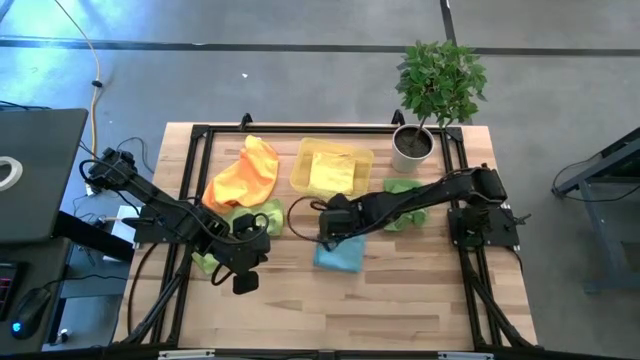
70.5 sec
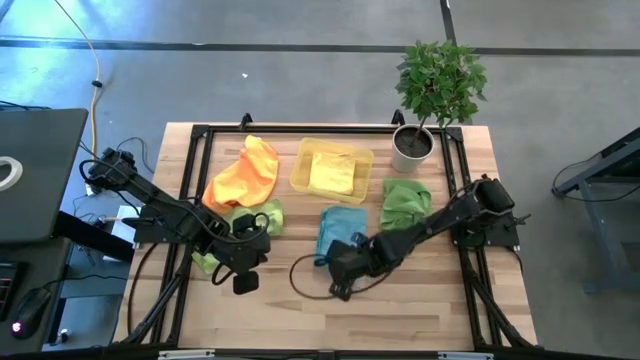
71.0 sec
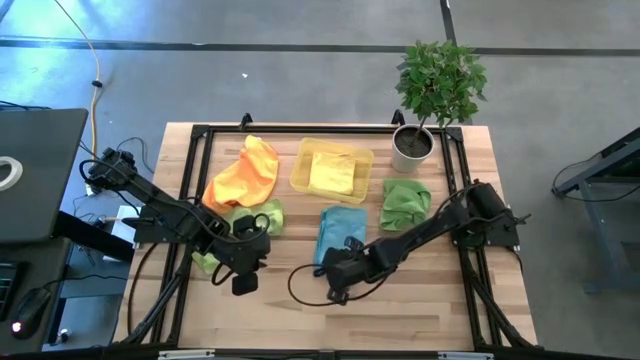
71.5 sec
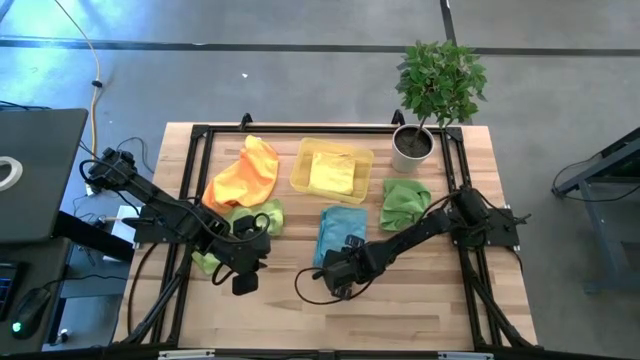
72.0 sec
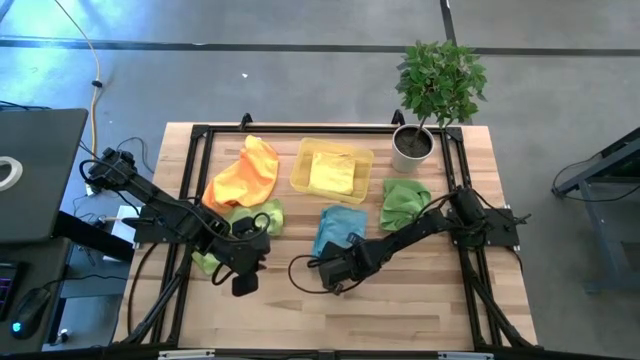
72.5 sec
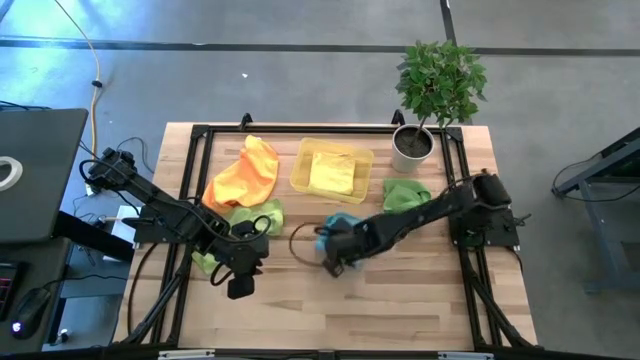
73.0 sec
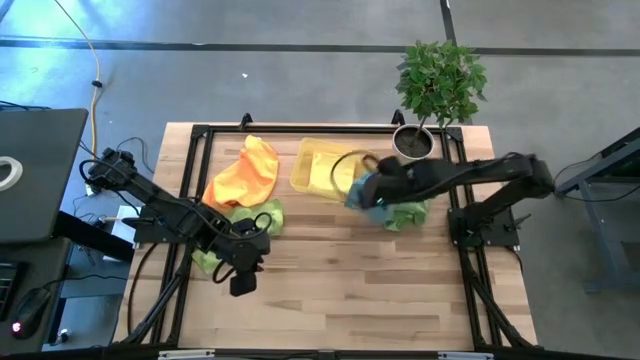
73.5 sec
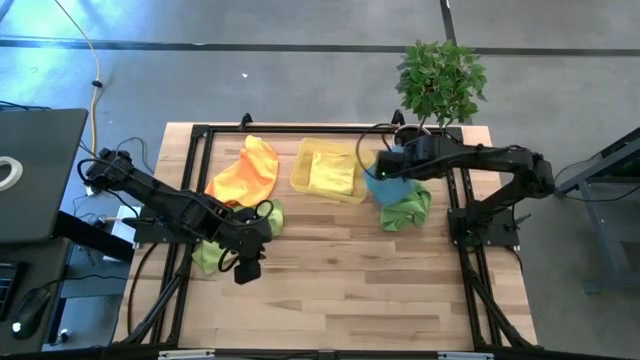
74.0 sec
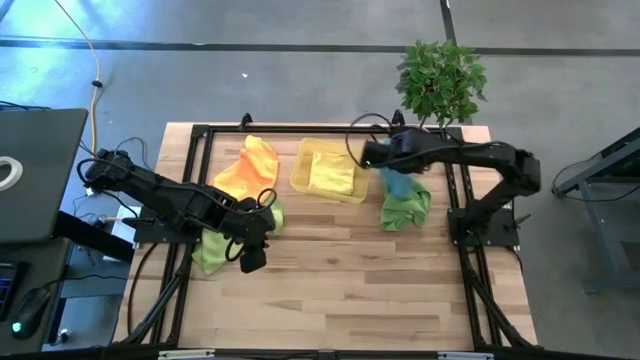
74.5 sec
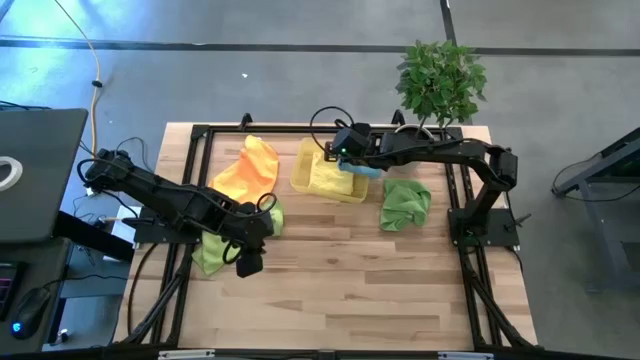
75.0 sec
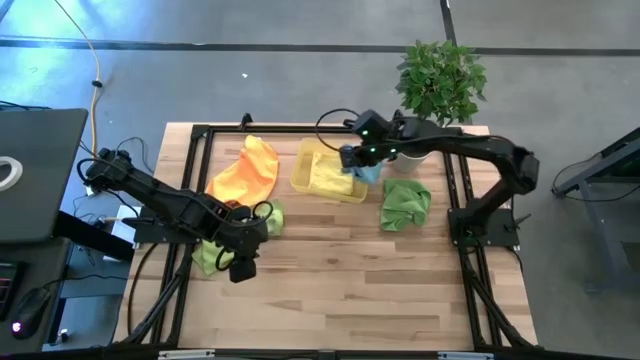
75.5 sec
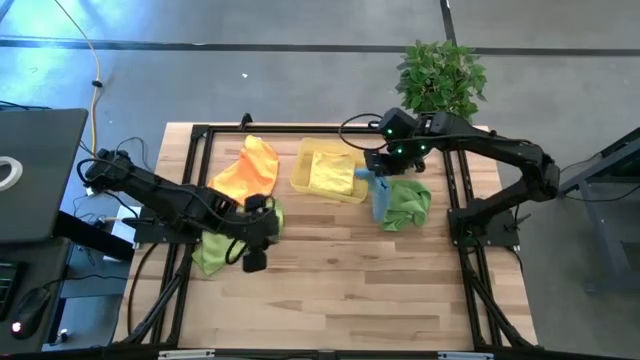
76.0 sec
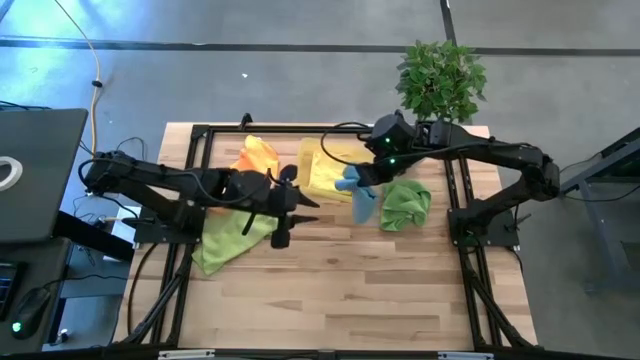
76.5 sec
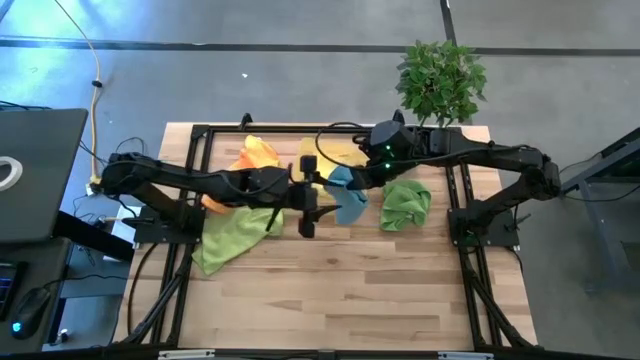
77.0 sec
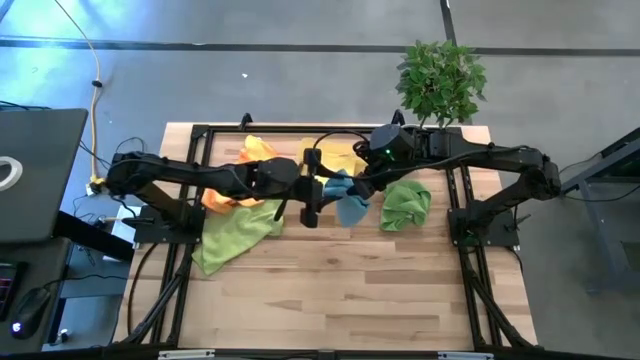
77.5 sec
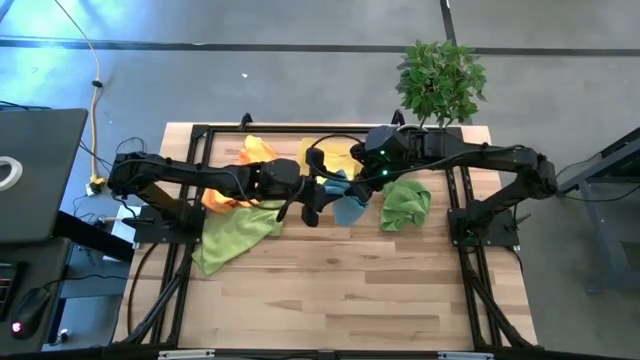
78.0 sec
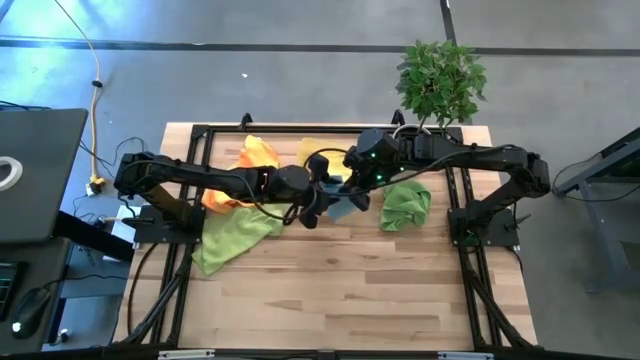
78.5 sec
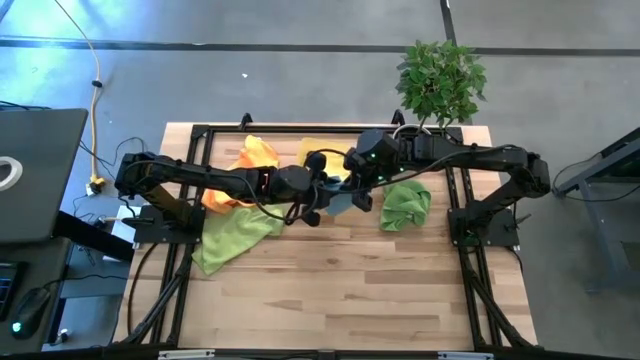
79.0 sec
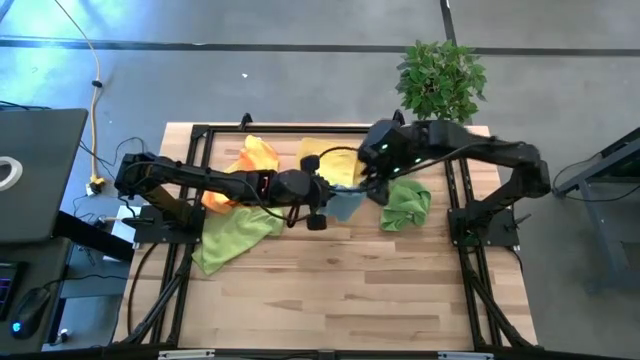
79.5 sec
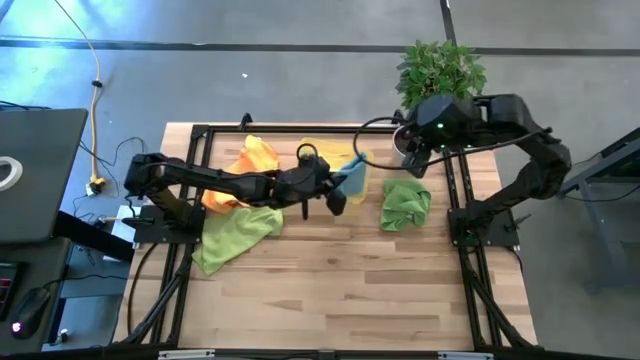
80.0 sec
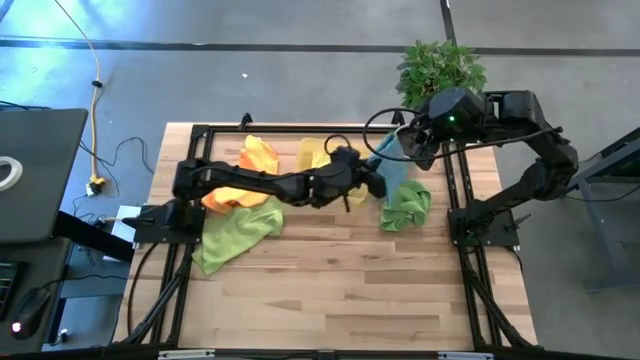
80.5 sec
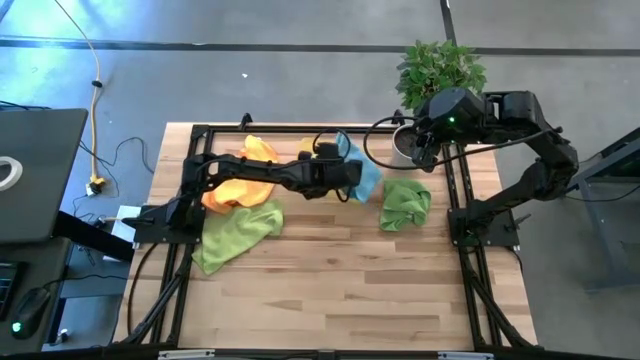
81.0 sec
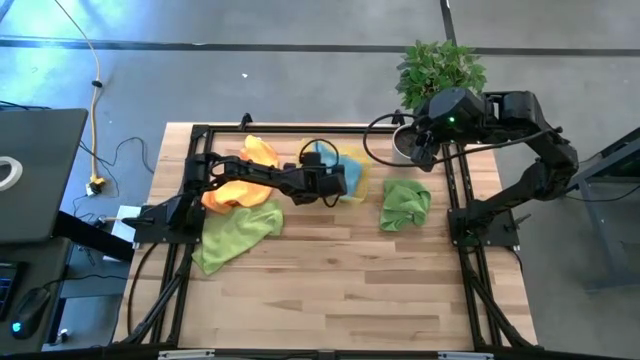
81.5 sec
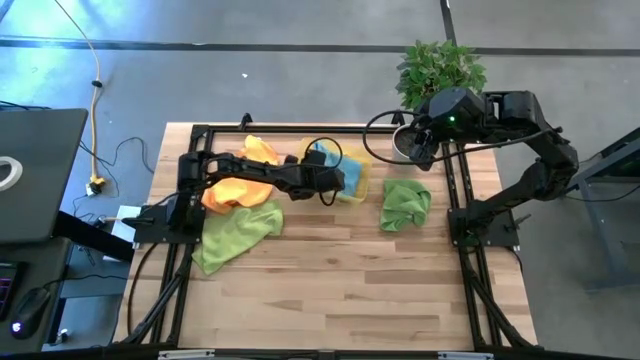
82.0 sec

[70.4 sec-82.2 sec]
Task: Fold microfiber towels
Put the folded blue microfiber towel into the yellow bin

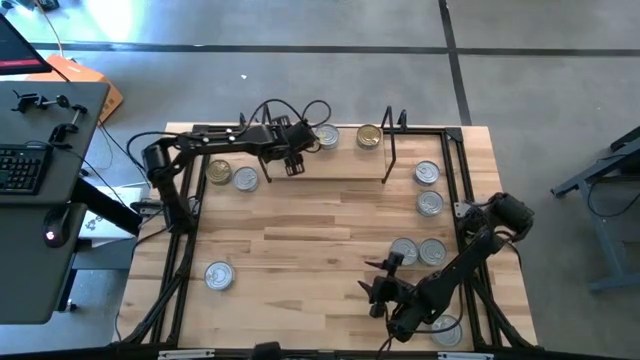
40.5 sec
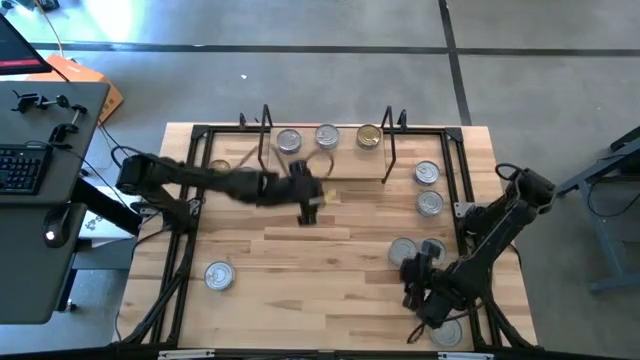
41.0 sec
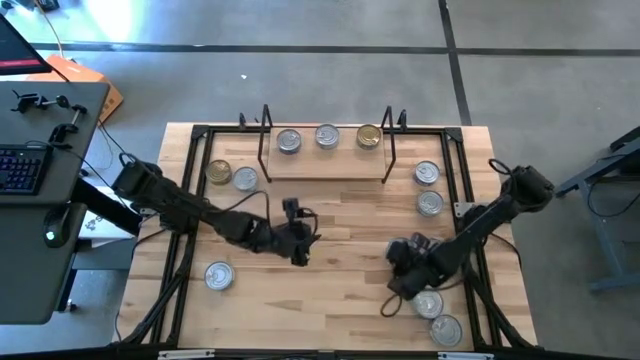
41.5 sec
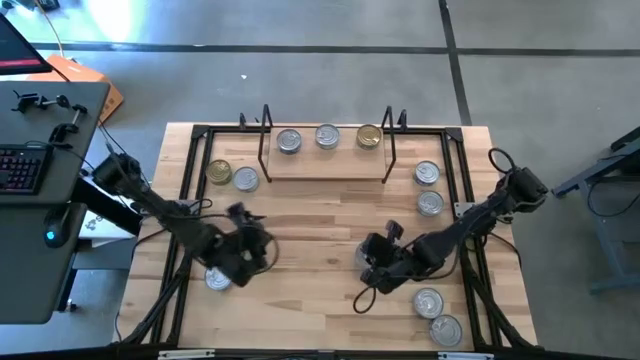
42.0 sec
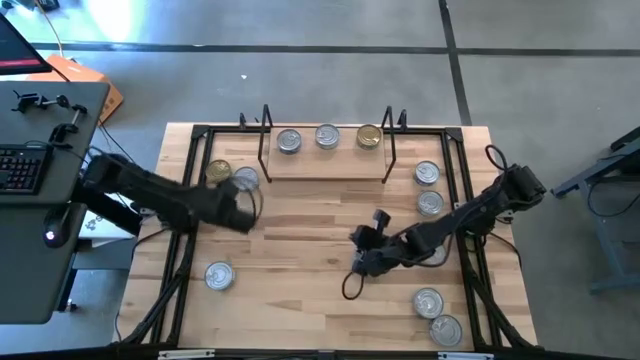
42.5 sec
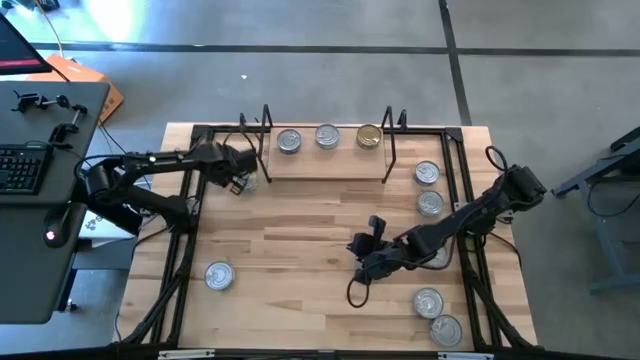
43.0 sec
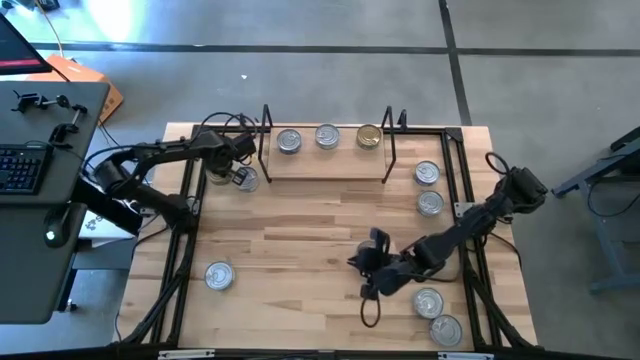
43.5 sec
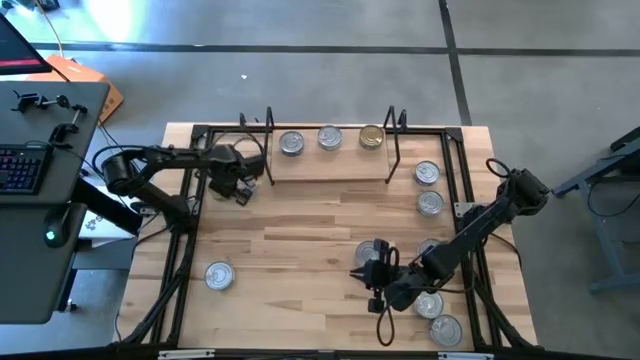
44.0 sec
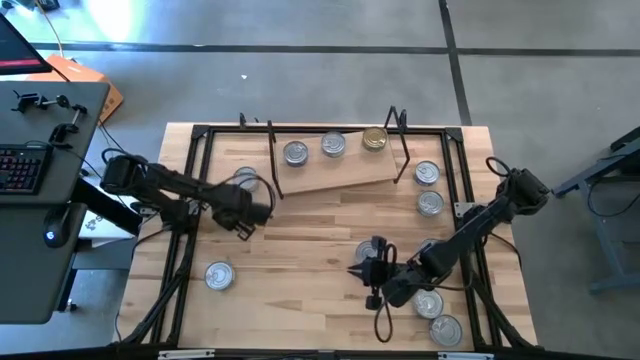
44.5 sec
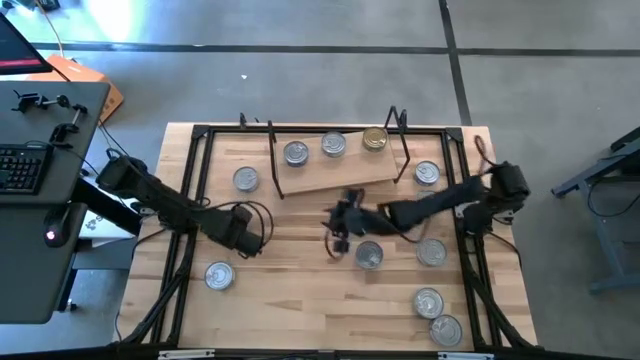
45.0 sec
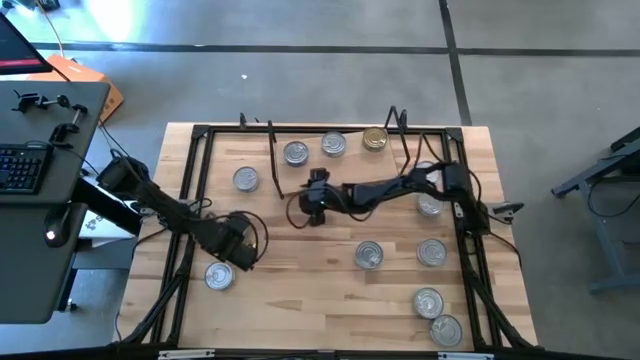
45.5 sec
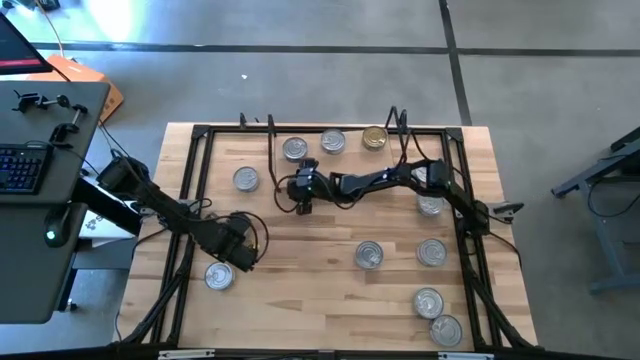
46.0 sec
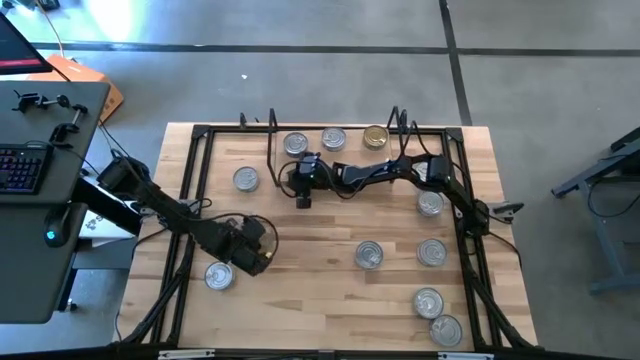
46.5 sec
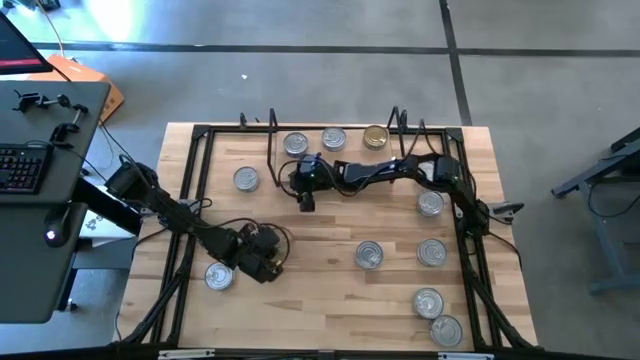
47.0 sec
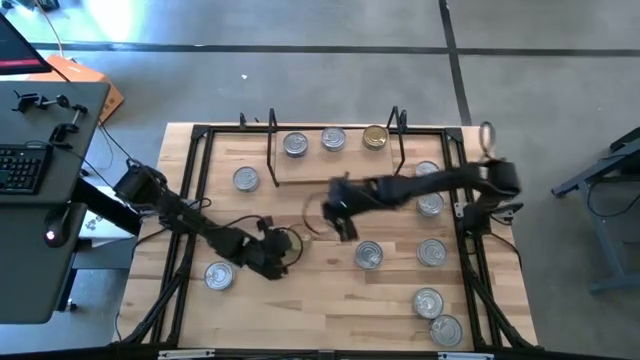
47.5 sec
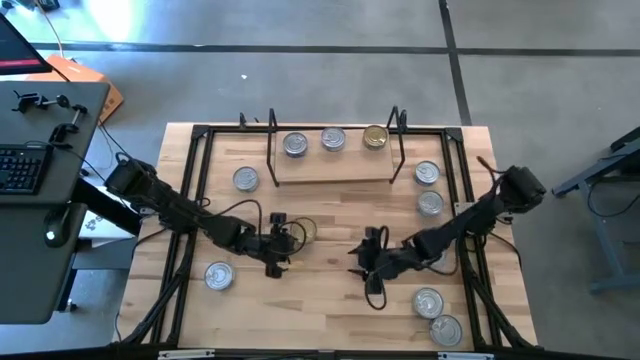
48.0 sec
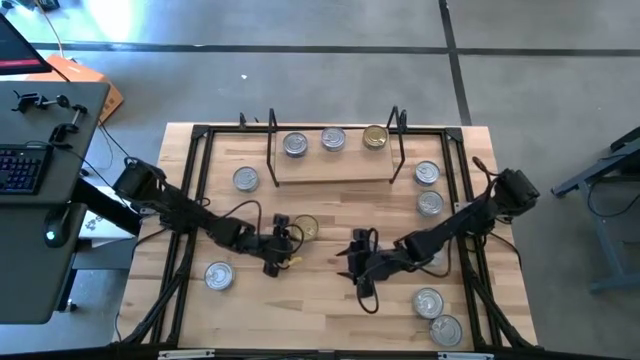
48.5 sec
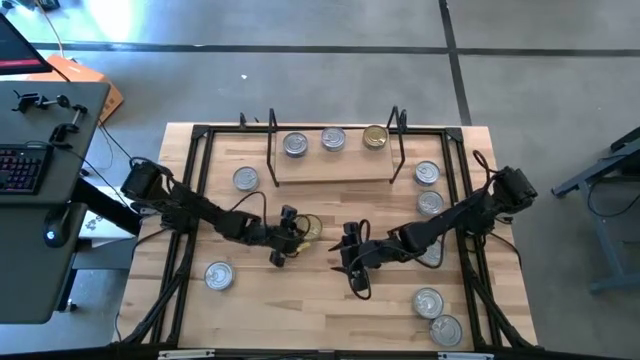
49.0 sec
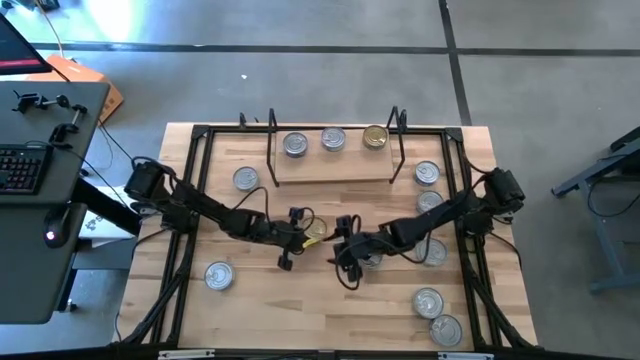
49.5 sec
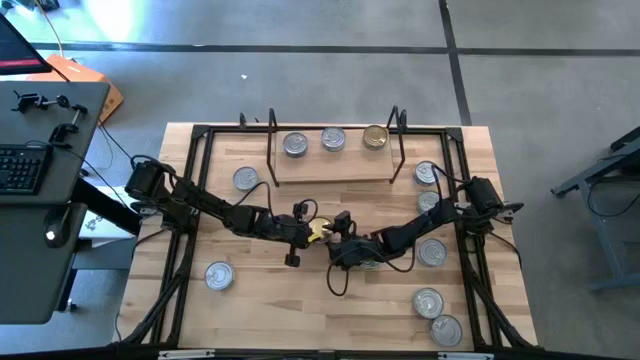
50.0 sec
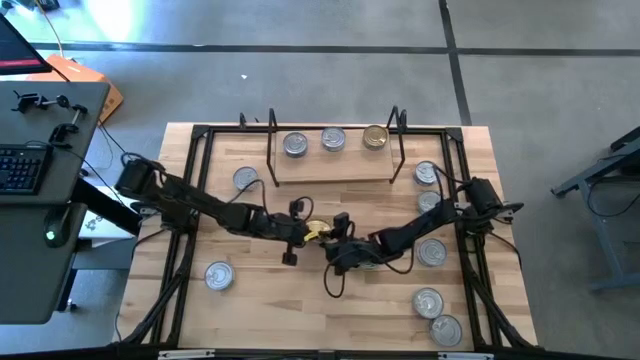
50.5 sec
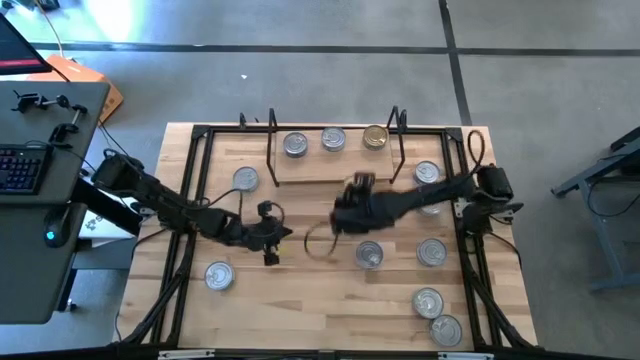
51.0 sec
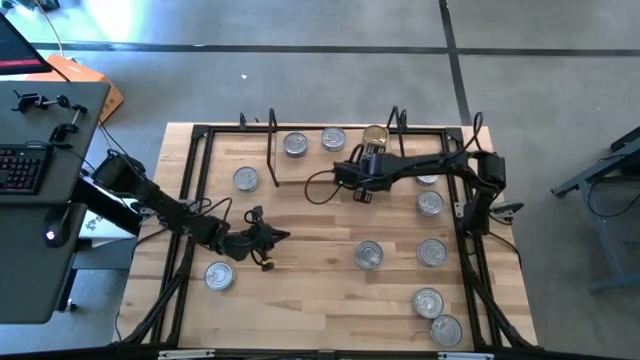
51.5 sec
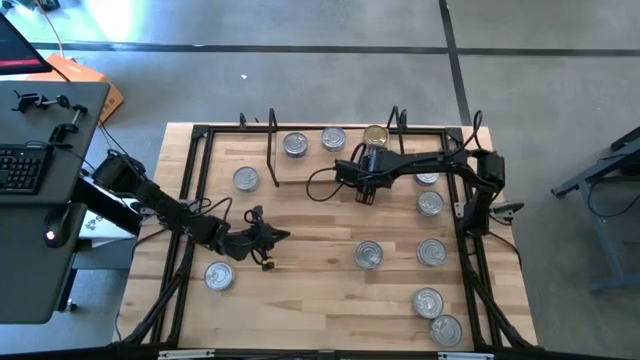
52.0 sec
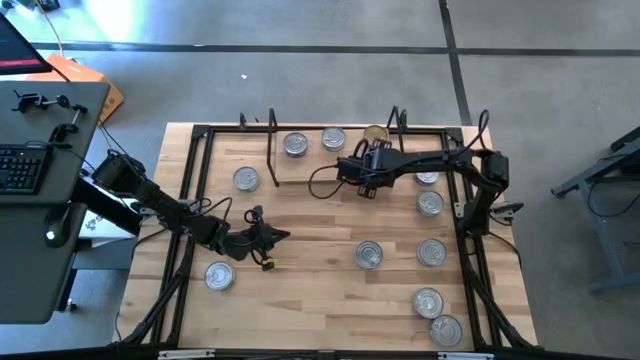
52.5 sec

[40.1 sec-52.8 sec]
Task: Stack canned seafood by type on shelf
Put the light green tuna can on the shelf and align it with the other light green tuna can
